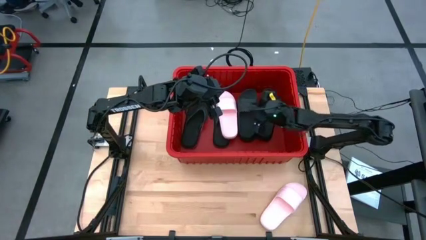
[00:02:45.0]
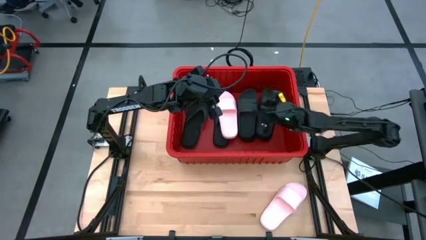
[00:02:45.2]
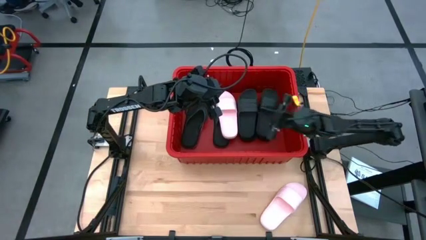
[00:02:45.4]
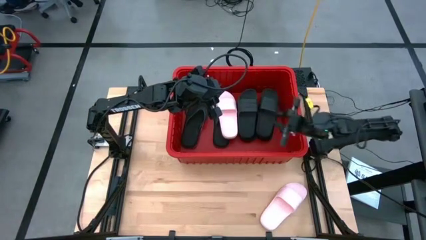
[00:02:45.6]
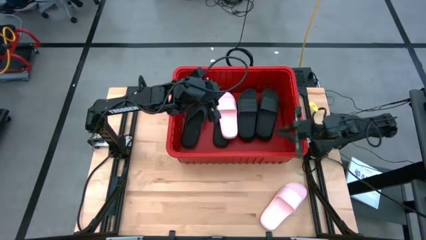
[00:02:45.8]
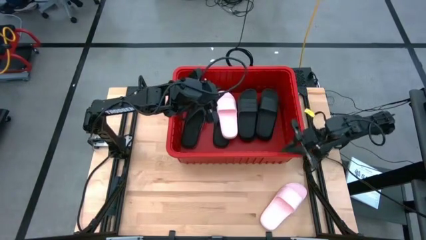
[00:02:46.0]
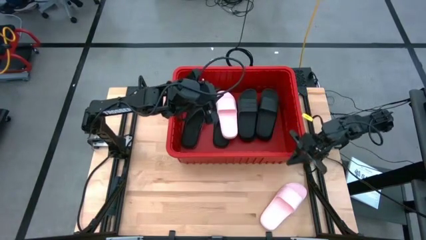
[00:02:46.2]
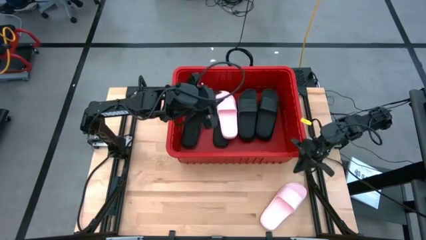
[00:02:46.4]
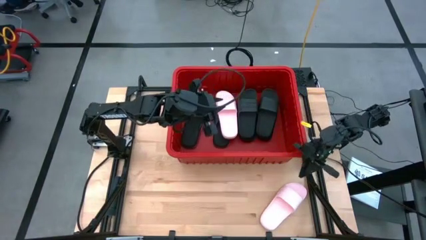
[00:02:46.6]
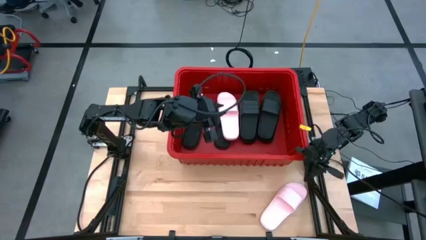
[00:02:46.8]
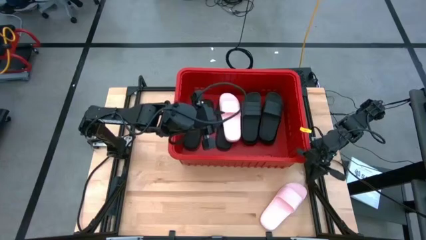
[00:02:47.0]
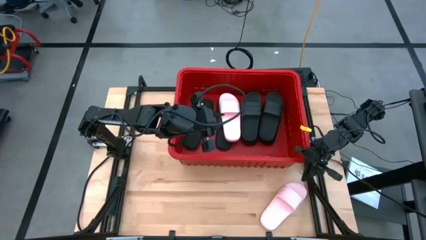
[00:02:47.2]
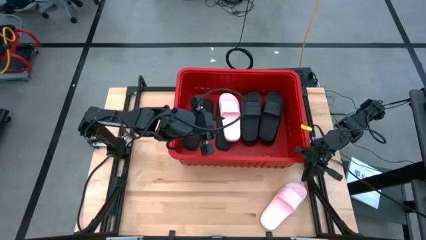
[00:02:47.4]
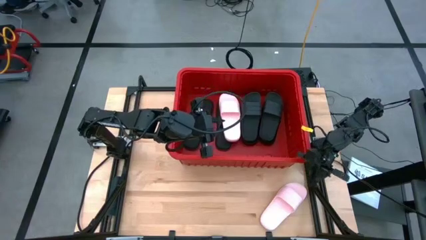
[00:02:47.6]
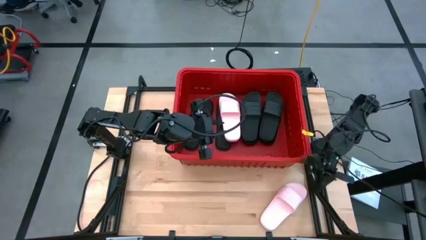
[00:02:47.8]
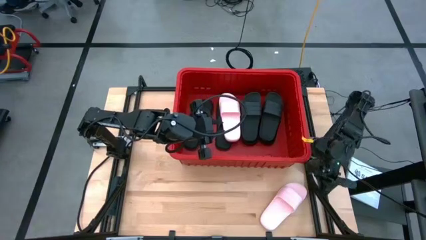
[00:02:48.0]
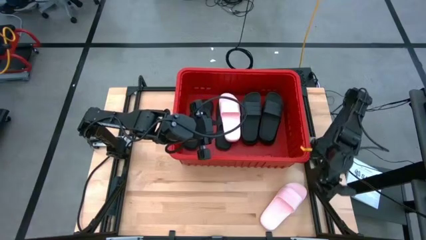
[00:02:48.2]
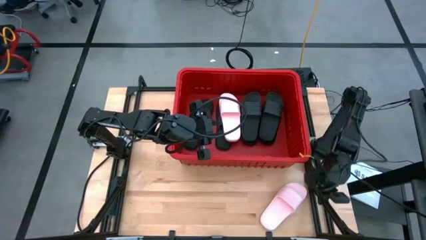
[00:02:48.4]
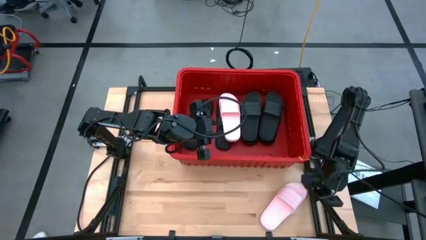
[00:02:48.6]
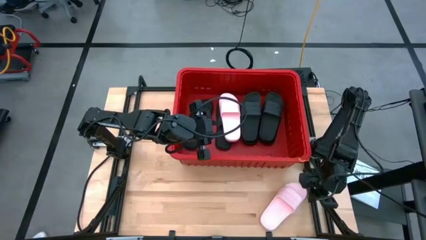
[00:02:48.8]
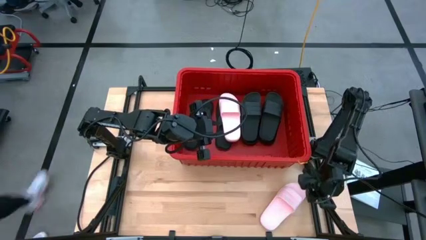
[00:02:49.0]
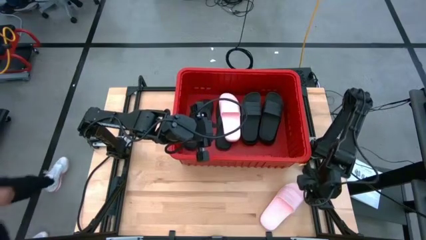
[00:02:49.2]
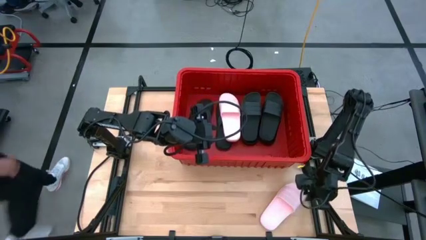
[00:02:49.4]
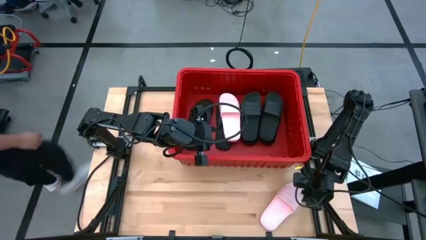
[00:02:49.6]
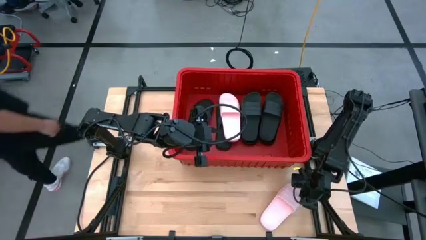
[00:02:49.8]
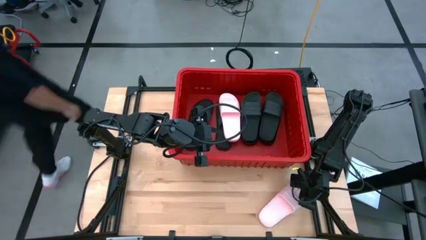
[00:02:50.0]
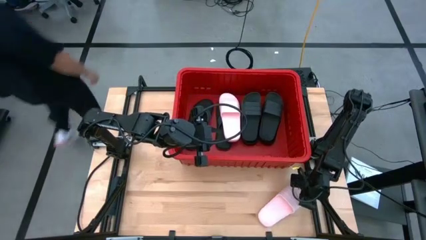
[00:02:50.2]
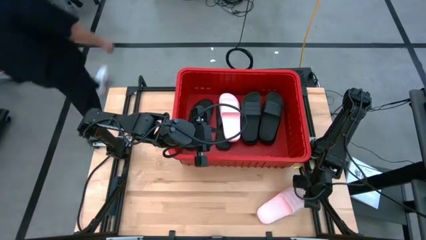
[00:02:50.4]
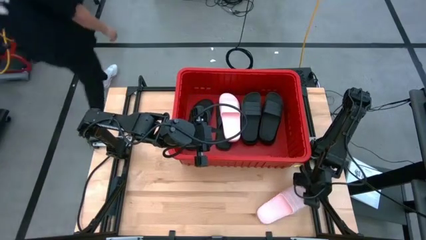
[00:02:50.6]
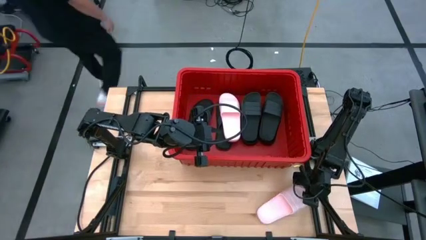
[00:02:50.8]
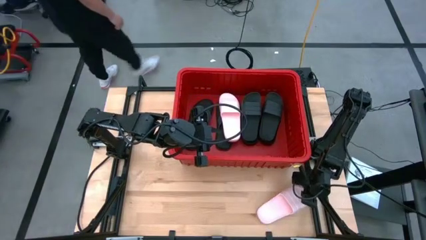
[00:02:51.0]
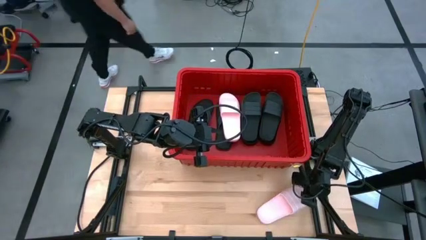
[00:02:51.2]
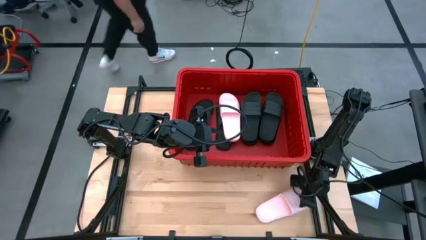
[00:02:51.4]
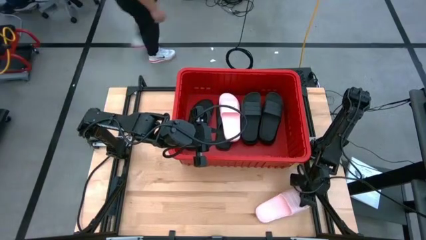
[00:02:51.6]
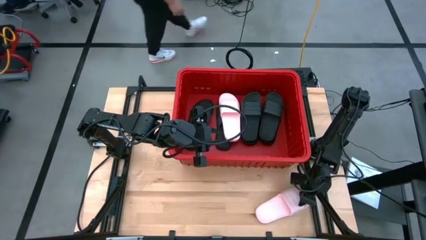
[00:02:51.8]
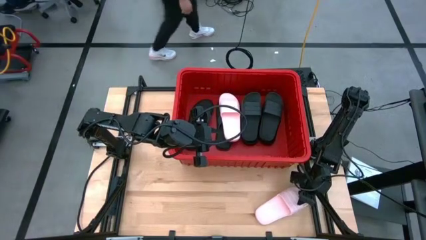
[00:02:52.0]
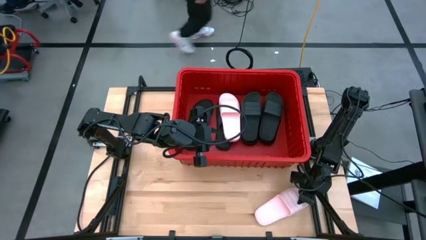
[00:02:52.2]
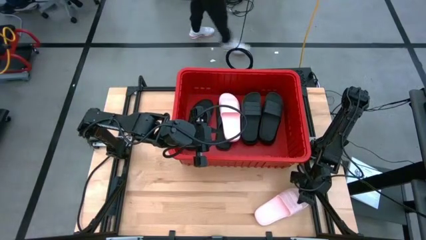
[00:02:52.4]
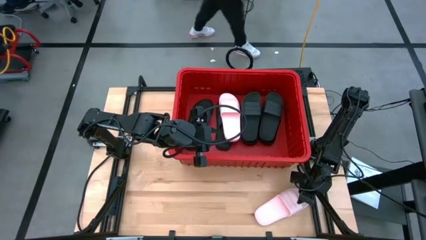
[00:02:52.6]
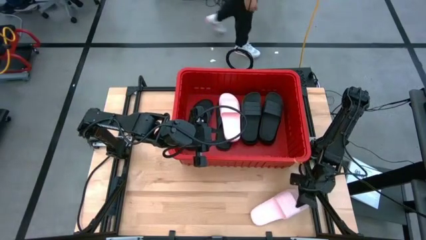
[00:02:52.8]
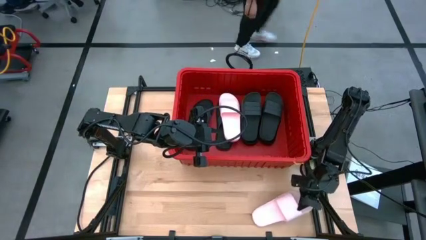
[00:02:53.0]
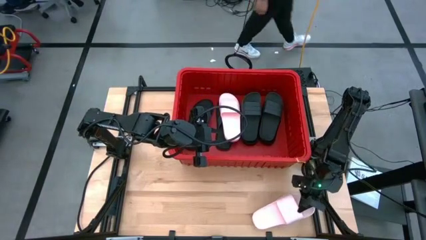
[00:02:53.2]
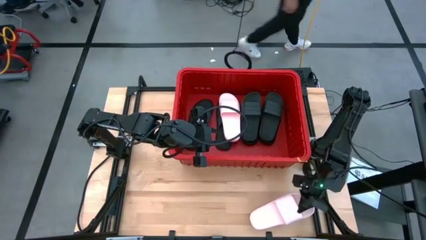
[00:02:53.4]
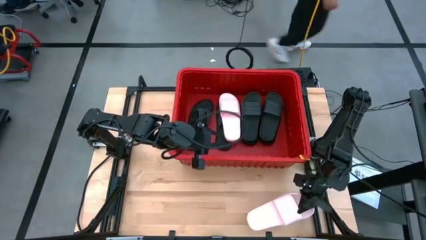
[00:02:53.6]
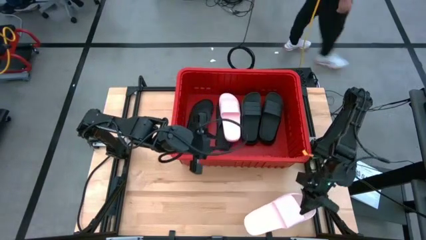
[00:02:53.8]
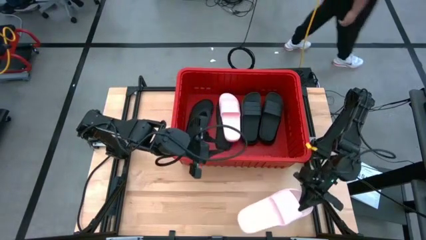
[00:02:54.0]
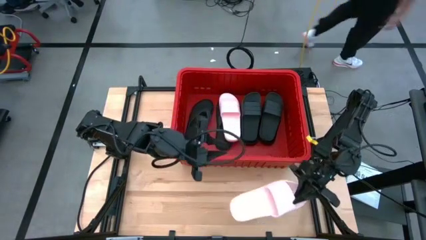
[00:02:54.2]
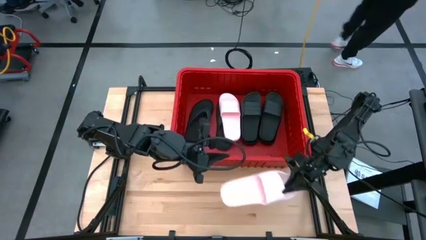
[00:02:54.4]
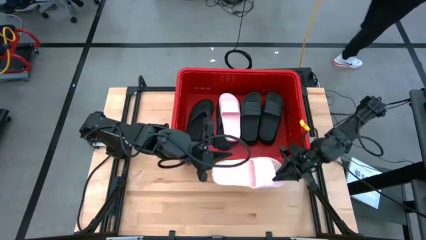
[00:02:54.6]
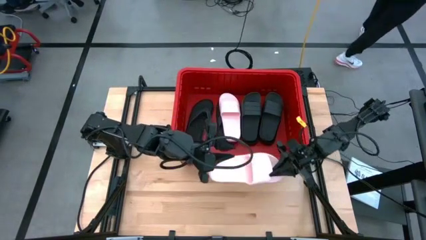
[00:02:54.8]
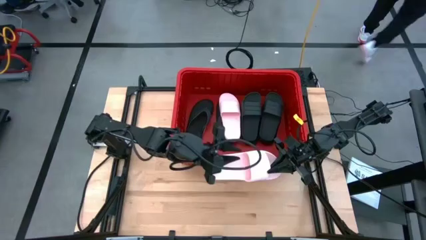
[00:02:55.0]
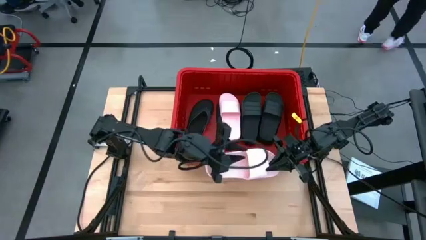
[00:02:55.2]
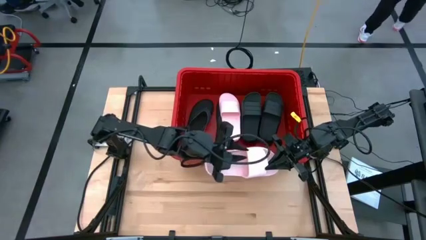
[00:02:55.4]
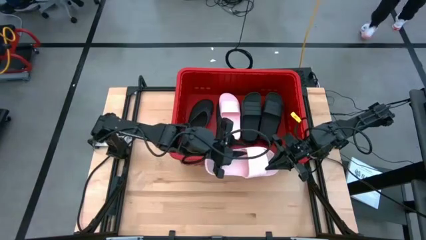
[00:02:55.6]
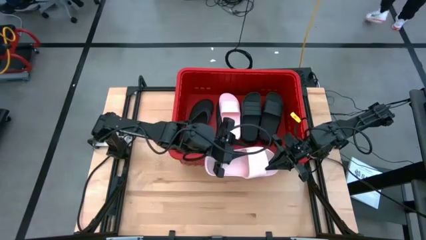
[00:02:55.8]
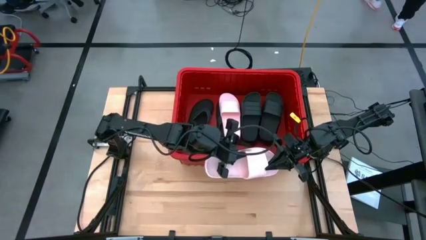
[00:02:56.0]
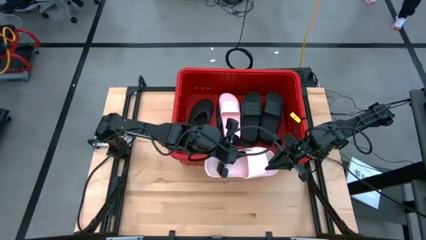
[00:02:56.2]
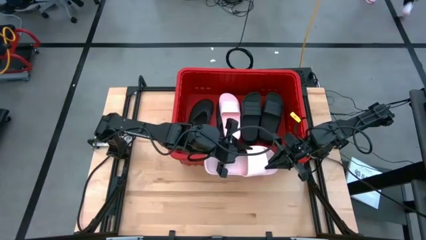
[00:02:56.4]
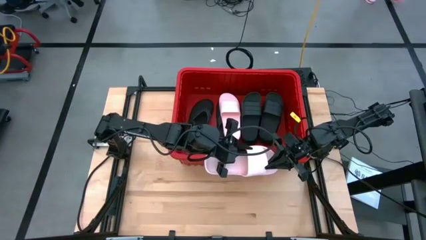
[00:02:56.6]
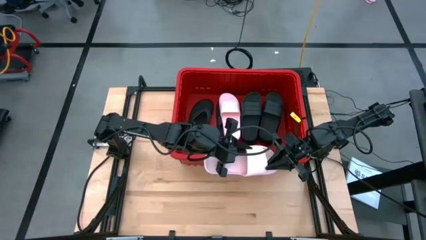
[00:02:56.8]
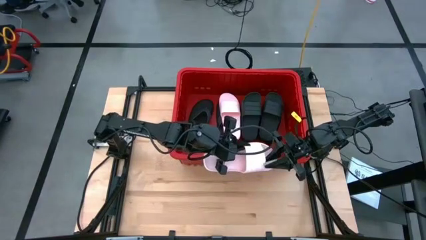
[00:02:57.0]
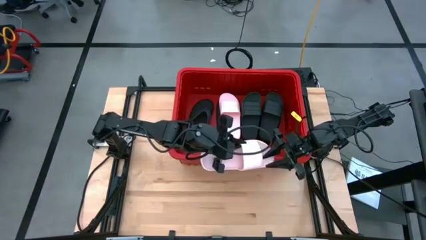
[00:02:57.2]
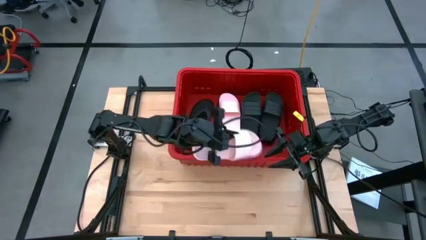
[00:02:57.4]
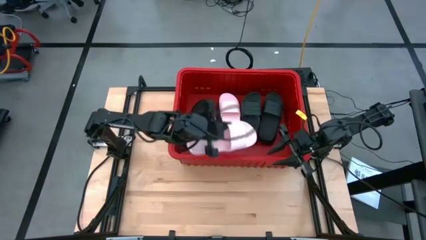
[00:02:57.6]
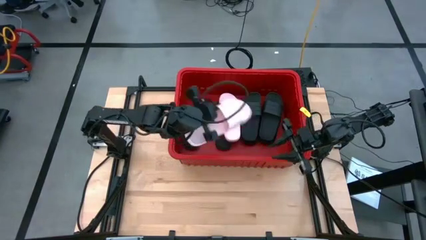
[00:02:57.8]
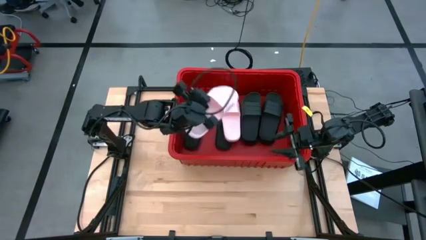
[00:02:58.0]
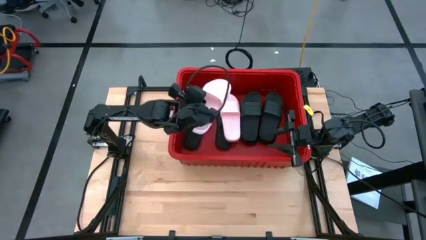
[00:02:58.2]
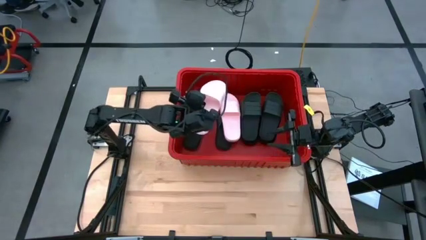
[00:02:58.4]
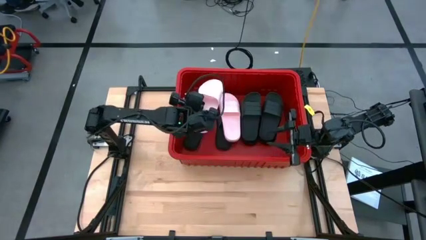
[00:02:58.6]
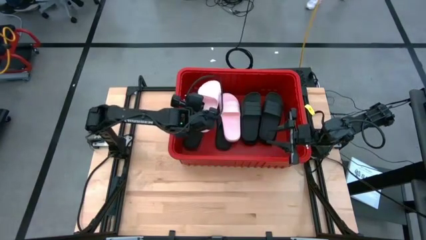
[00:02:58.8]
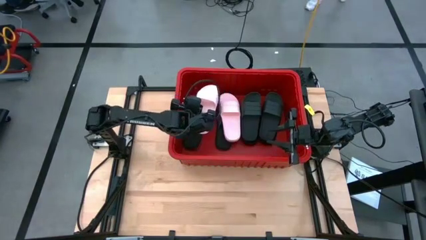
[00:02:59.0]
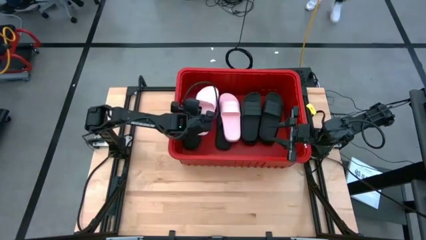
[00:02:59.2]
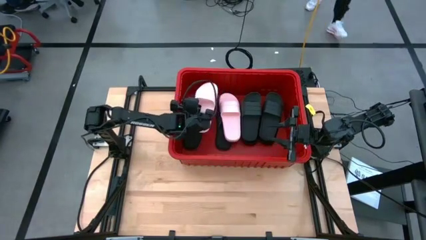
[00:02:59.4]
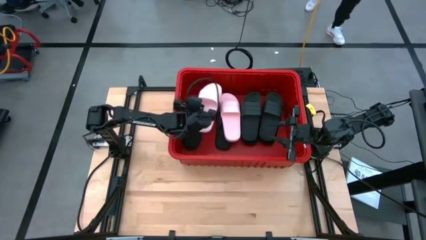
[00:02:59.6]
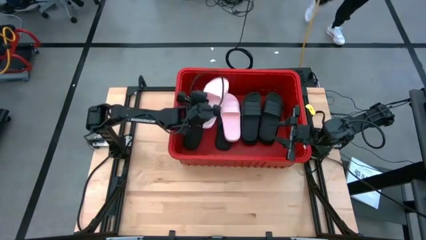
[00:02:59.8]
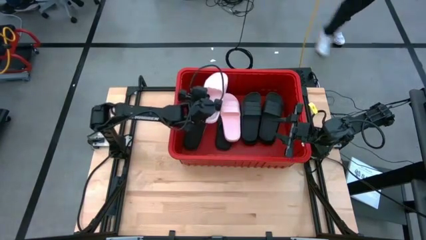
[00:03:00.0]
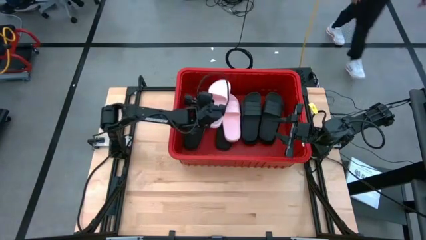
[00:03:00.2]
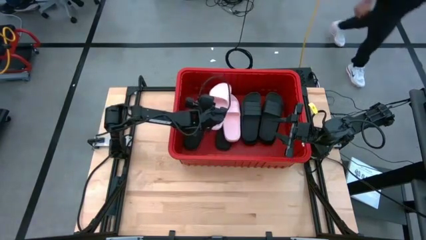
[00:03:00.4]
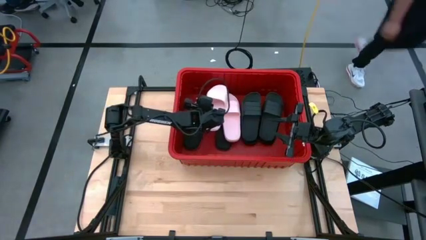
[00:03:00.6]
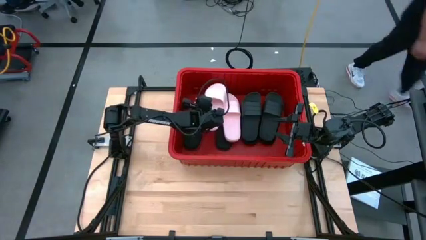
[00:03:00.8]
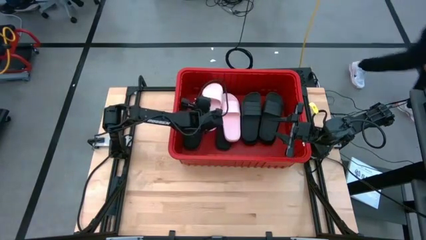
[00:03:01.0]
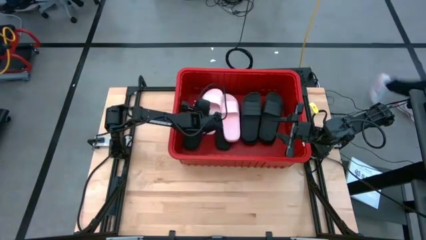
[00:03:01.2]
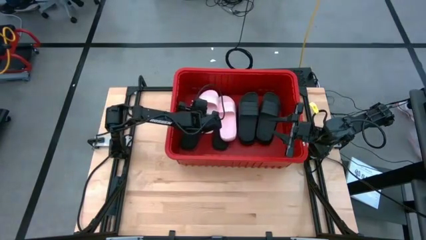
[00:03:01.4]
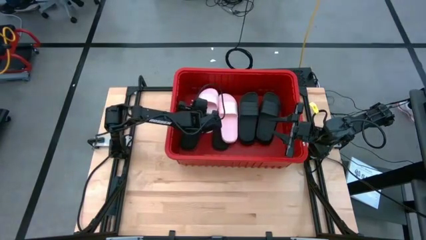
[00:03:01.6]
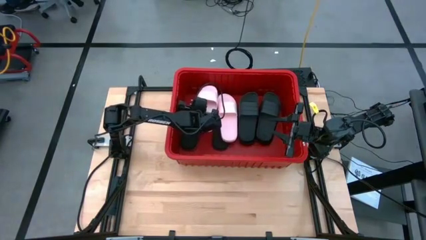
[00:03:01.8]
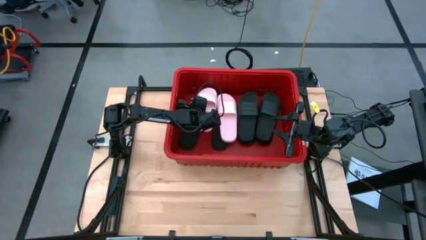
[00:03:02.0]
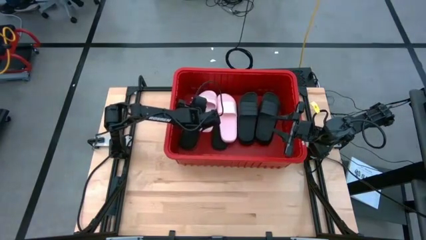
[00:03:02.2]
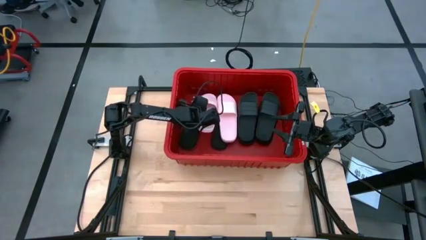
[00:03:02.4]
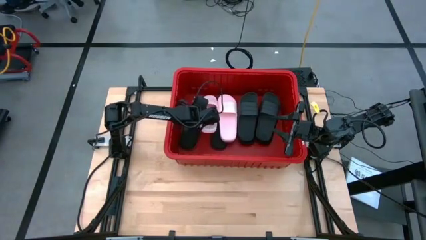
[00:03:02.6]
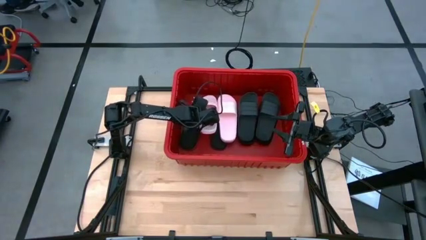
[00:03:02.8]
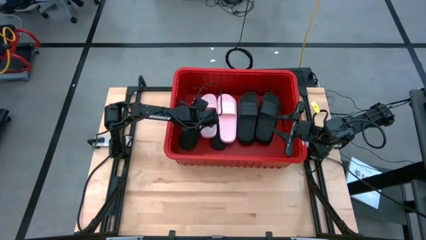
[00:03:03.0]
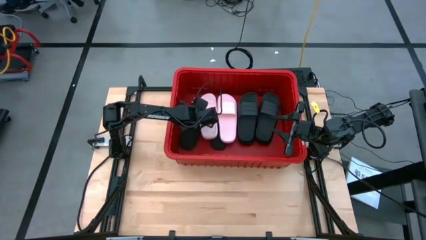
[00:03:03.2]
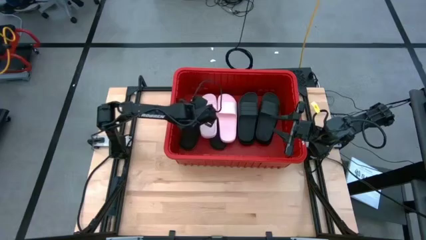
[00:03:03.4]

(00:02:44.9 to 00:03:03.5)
Task: Pick and place slides into bin
Put the pink slide into the red bin
